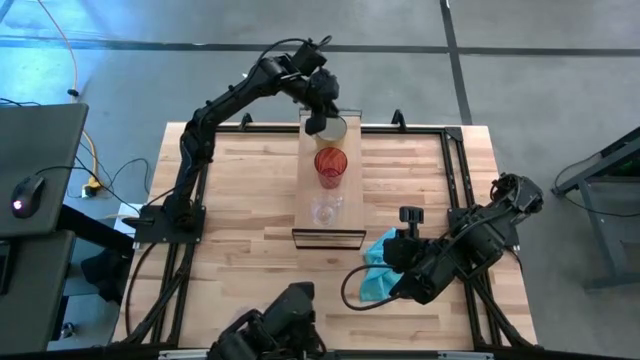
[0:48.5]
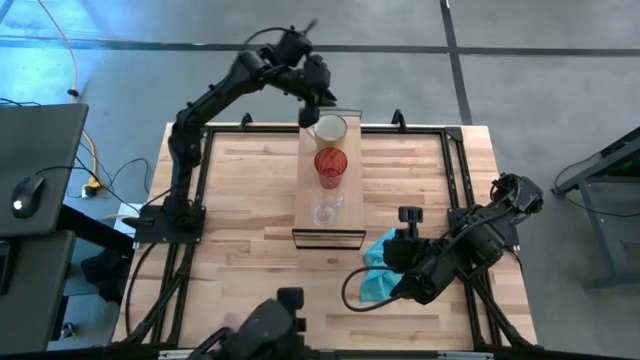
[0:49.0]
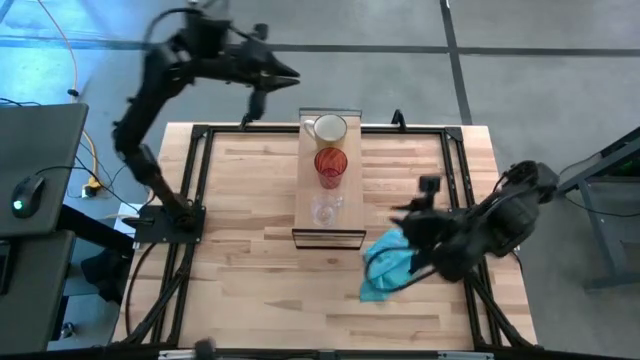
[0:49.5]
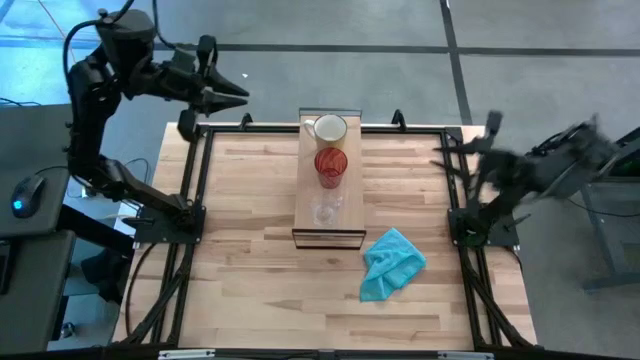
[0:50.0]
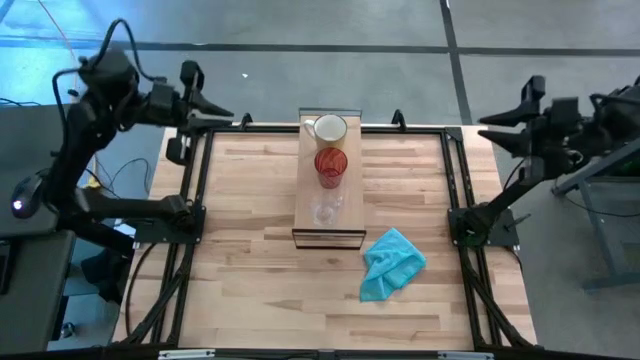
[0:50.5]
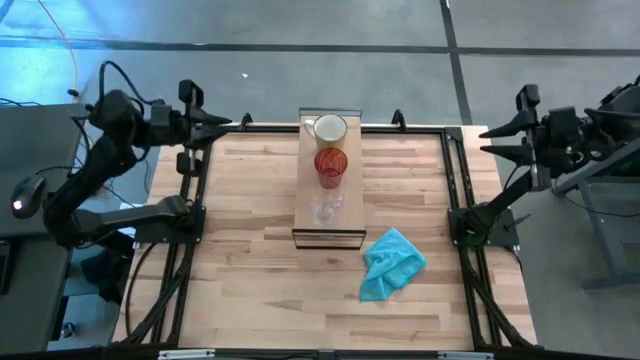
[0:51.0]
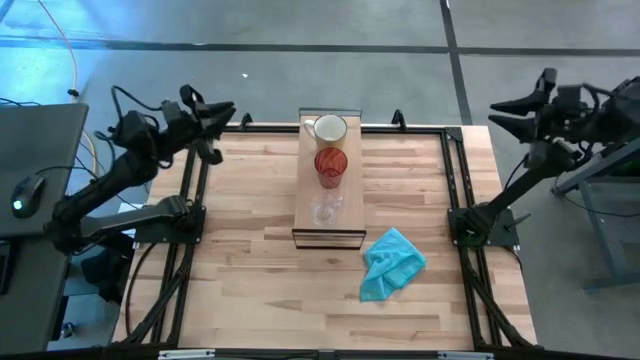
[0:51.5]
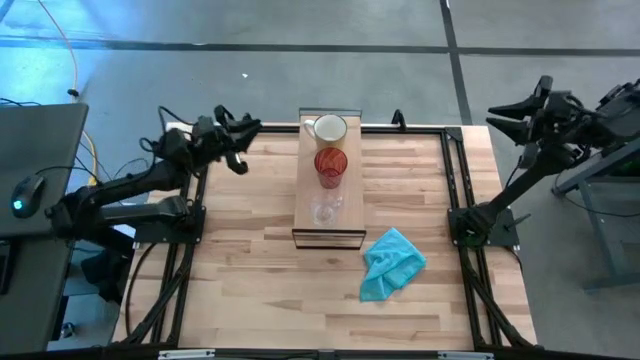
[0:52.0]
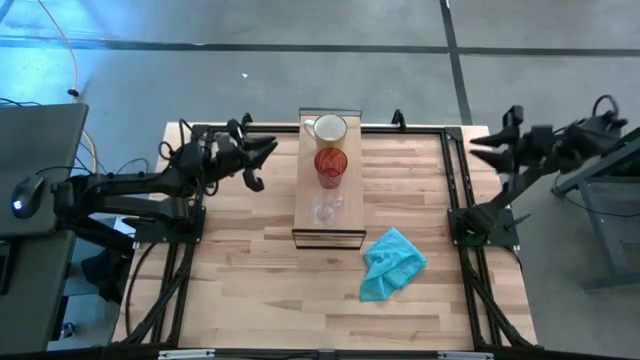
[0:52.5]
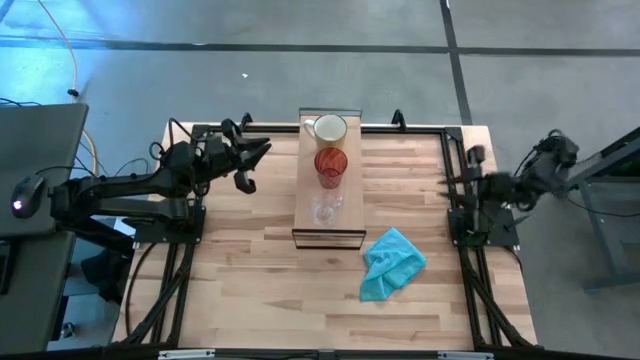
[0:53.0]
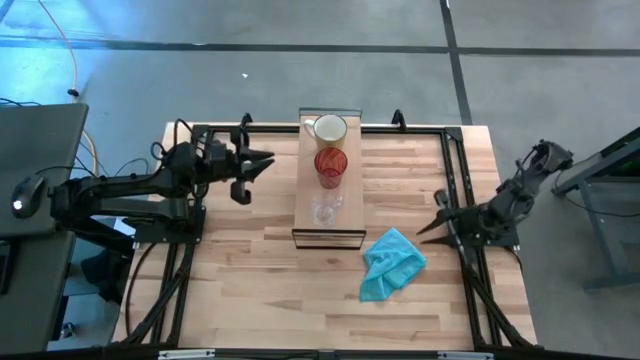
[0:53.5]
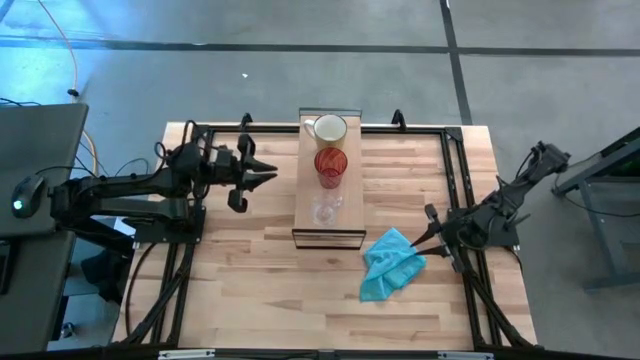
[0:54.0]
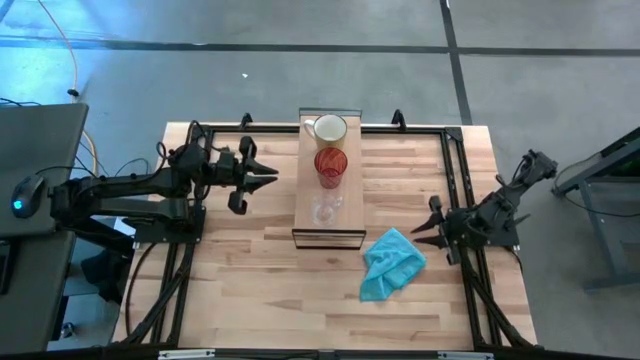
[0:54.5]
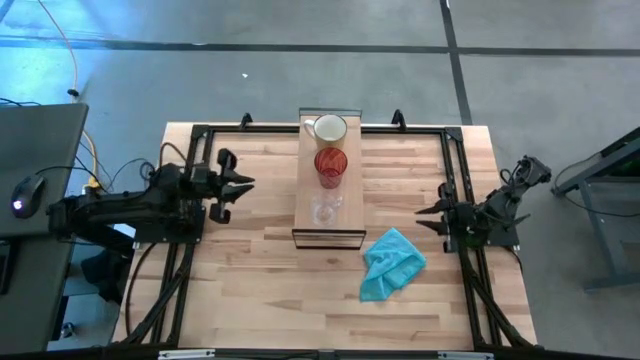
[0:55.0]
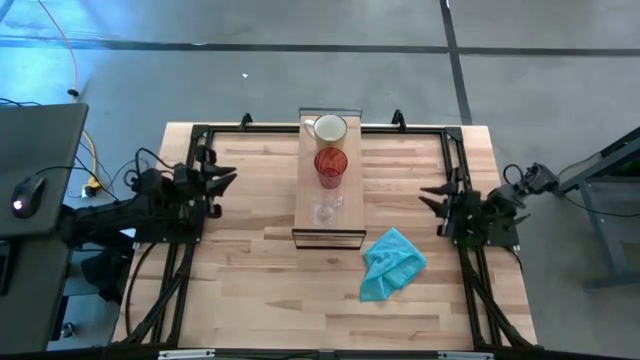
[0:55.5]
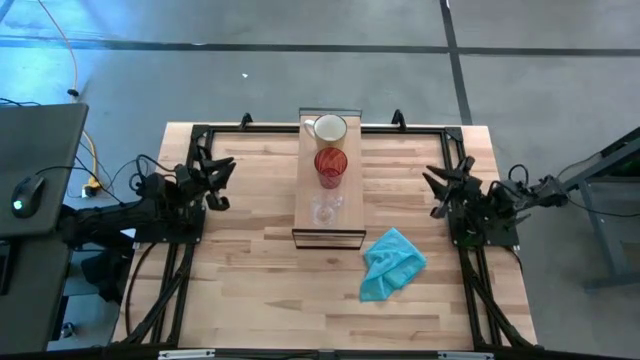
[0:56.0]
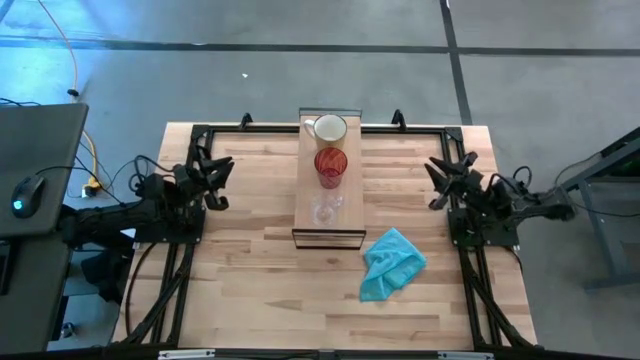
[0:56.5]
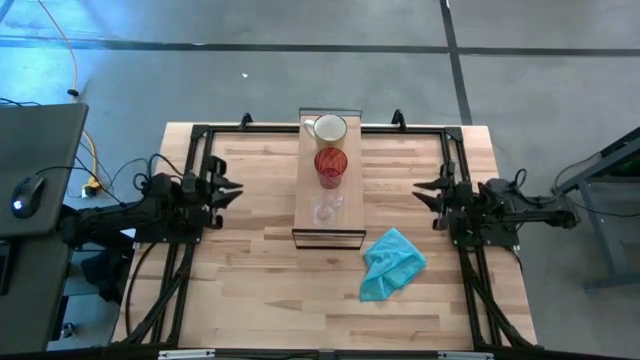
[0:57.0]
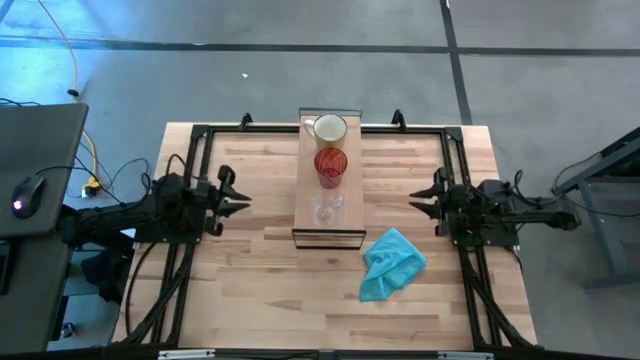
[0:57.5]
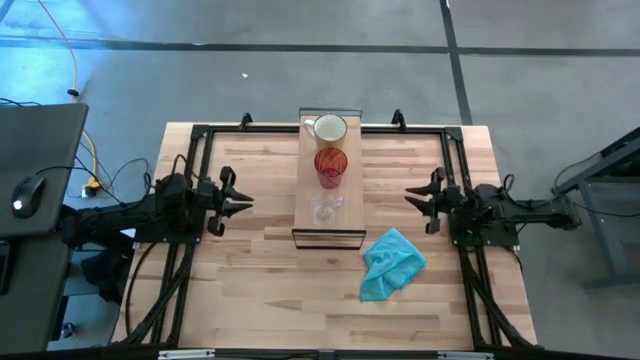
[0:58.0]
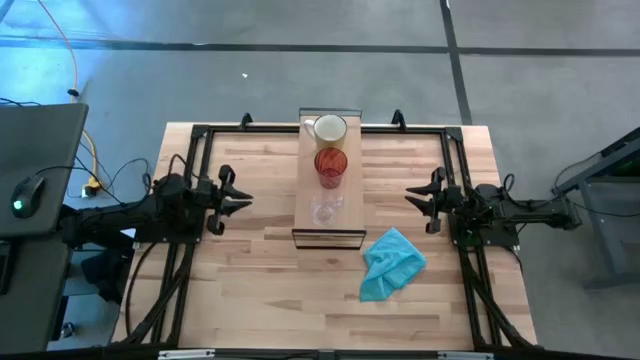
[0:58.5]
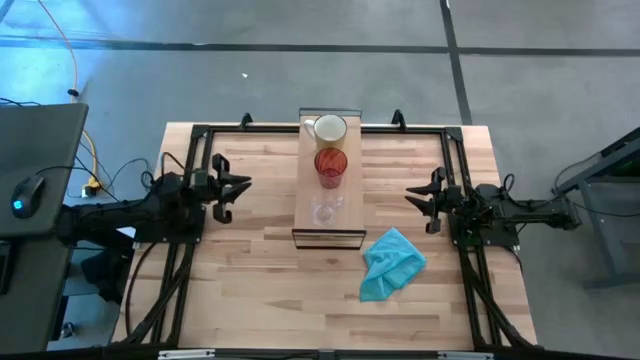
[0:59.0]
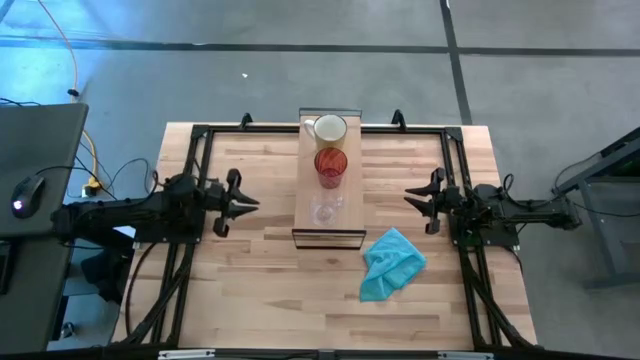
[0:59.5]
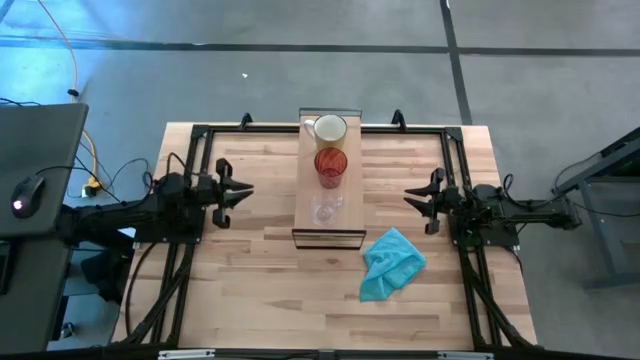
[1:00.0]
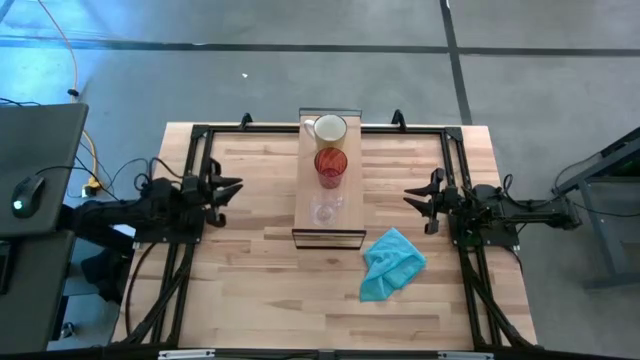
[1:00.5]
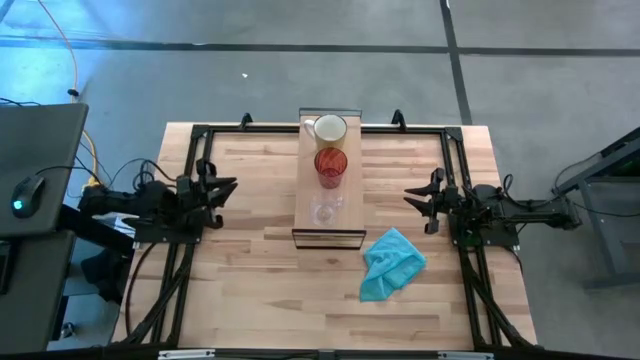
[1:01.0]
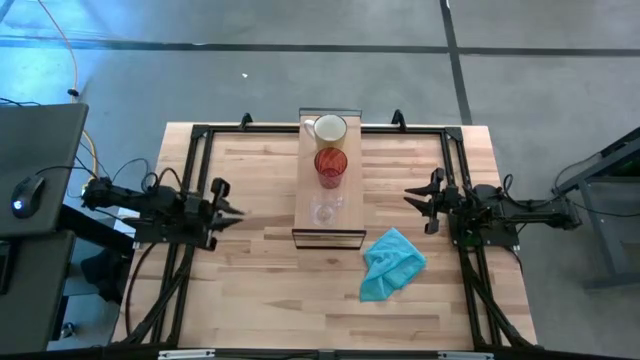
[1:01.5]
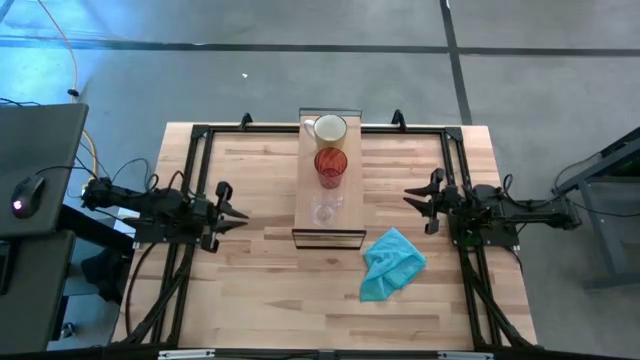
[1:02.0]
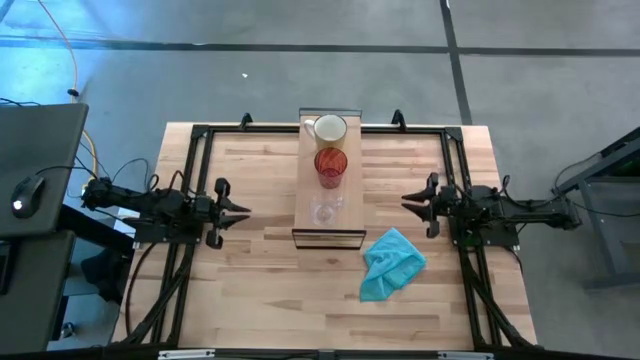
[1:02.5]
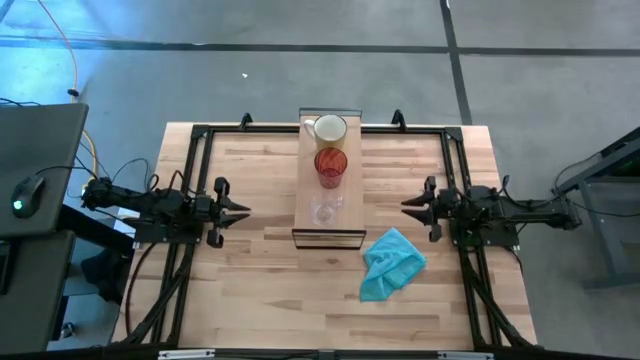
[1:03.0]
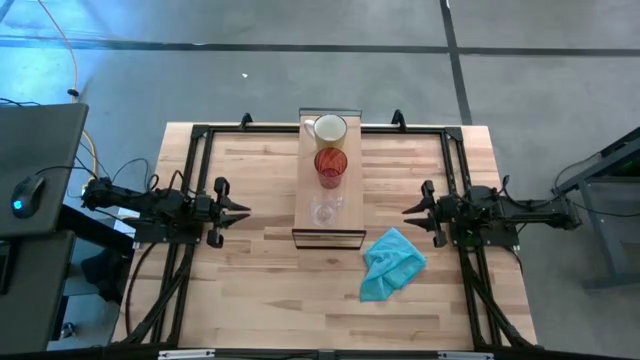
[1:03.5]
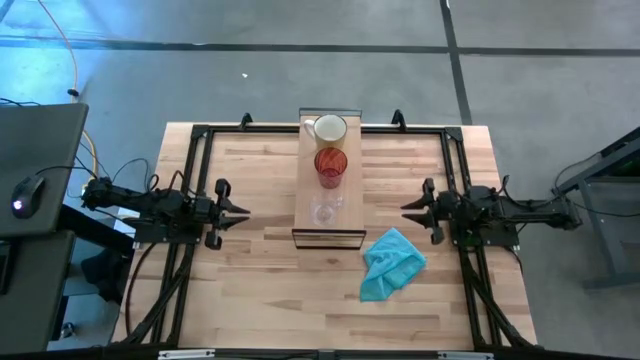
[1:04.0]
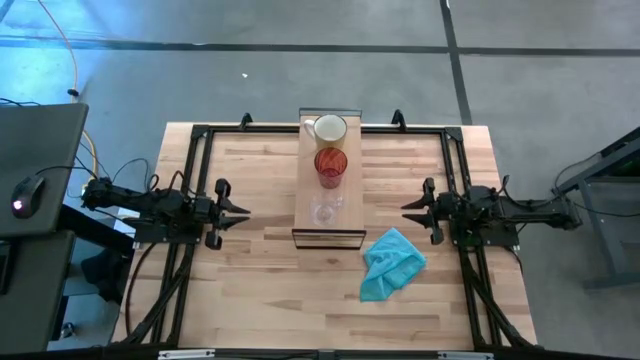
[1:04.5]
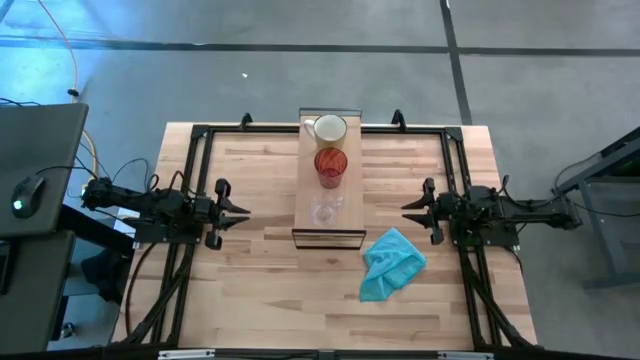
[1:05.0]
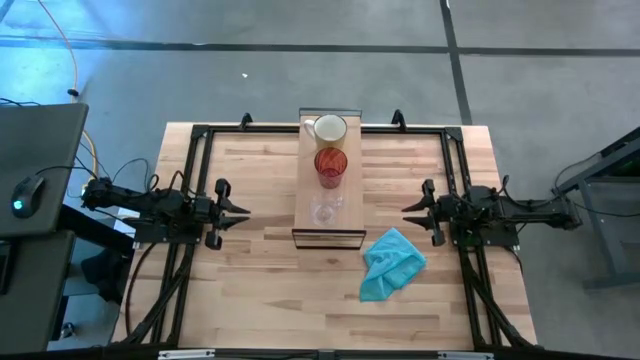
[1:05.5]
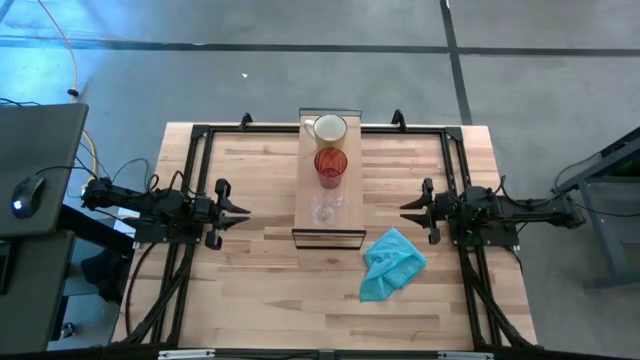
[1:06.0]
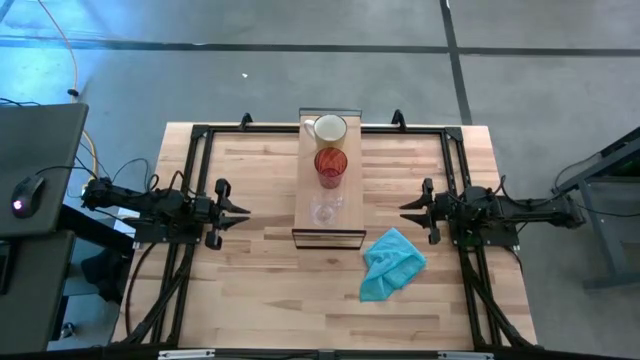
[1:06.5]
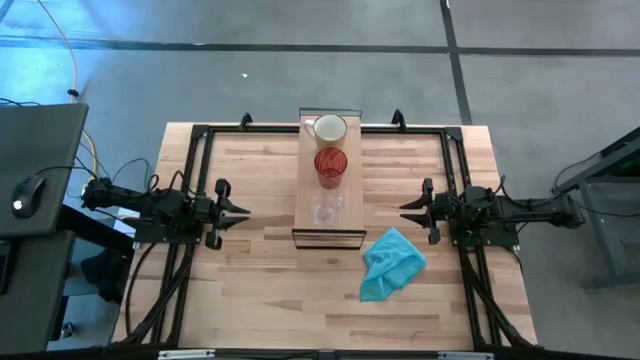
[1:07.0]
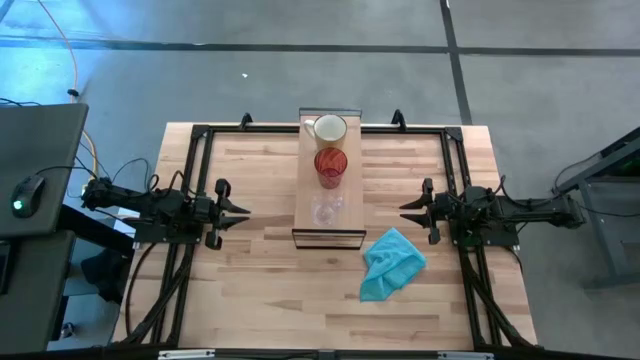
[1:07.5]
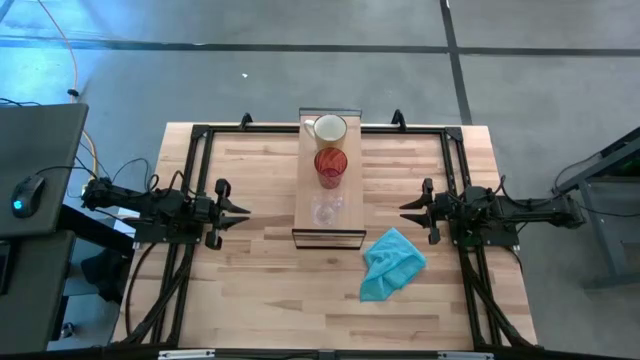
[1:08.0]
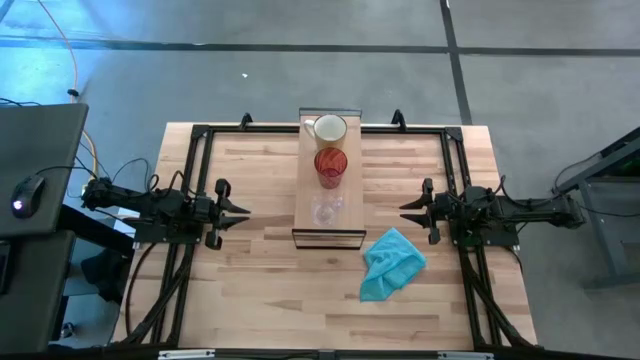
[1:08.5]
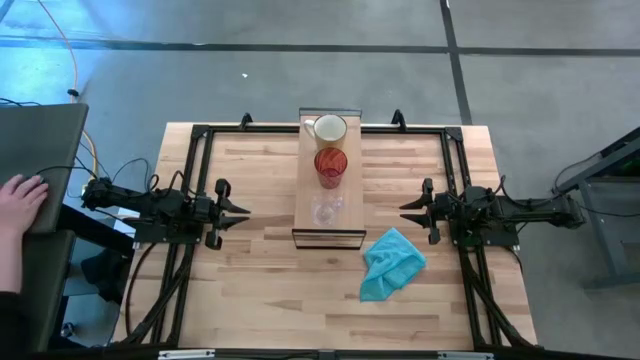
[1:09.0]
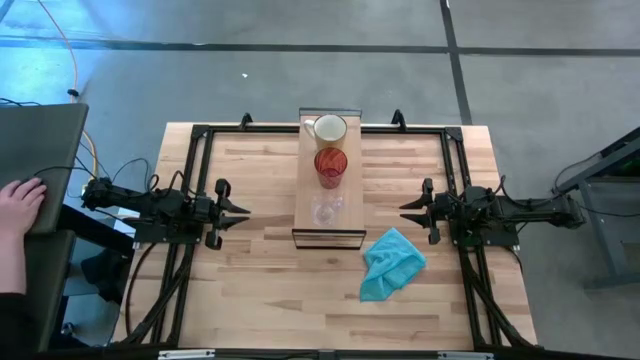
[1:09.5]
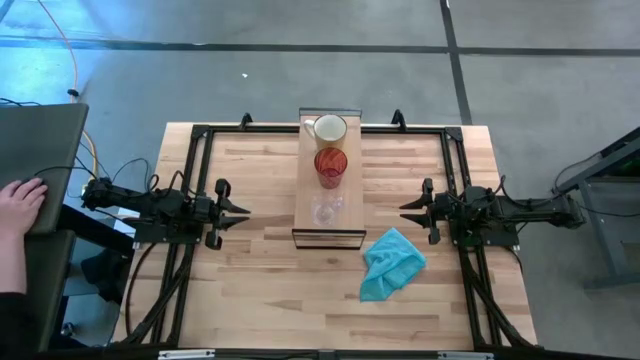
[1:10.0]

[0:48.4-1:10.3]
Task: Stack small to large cups/mugs on shelf
Return to Home Position
